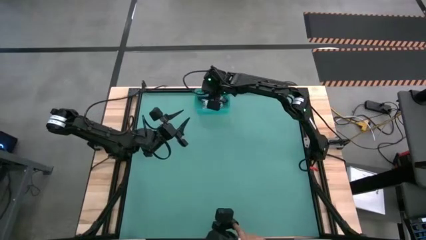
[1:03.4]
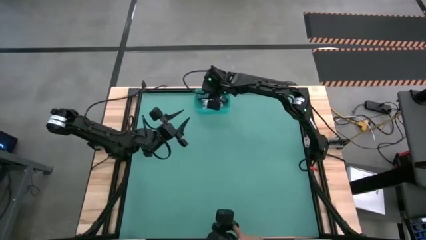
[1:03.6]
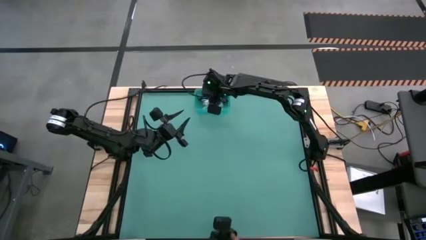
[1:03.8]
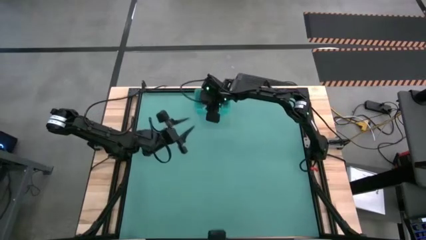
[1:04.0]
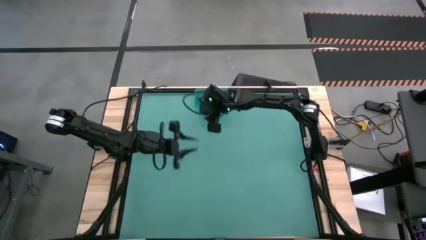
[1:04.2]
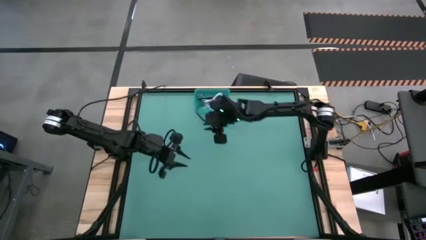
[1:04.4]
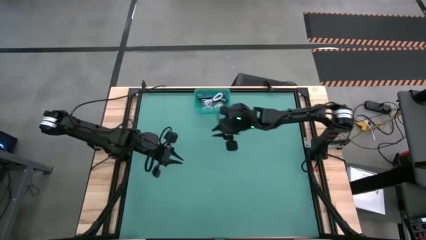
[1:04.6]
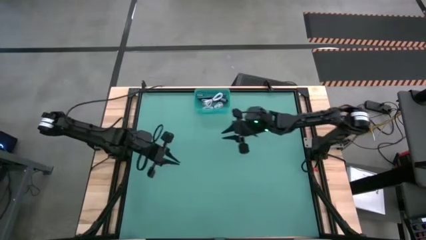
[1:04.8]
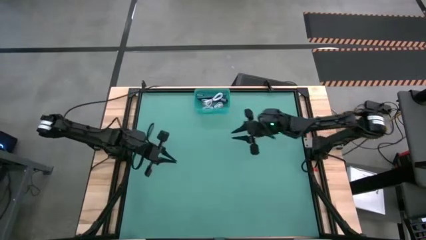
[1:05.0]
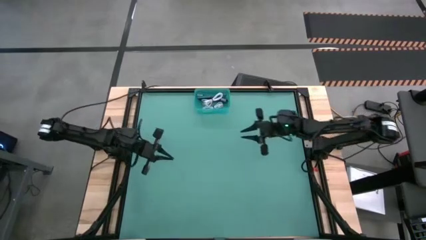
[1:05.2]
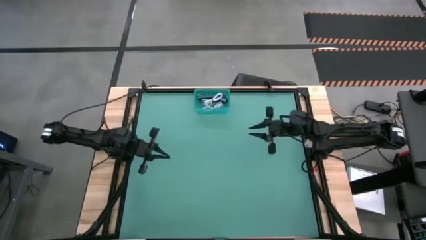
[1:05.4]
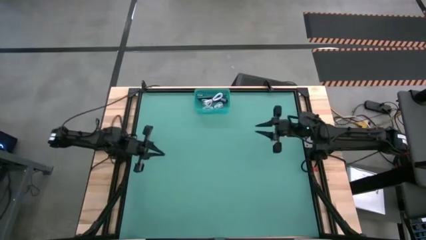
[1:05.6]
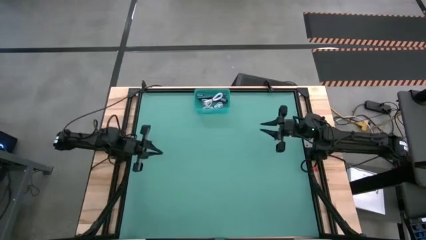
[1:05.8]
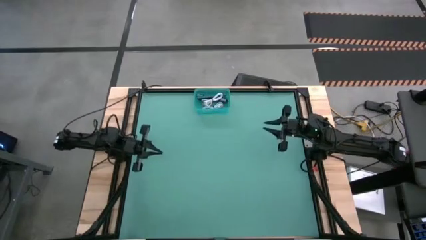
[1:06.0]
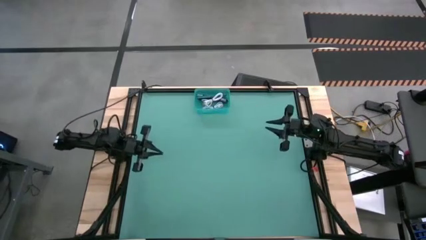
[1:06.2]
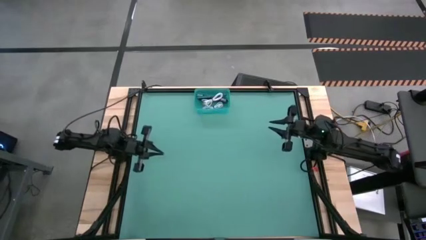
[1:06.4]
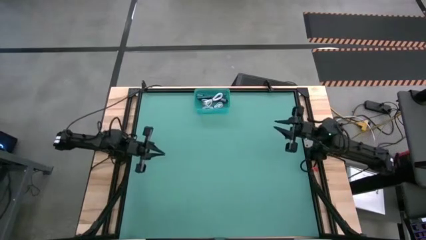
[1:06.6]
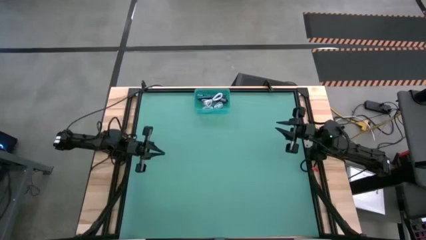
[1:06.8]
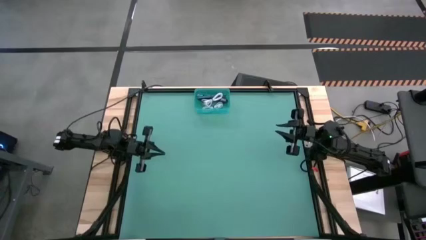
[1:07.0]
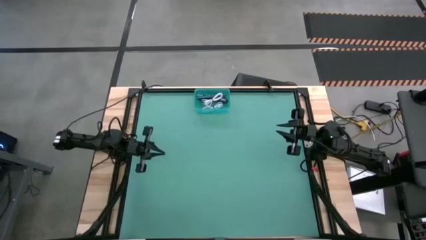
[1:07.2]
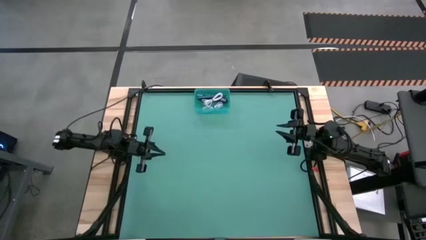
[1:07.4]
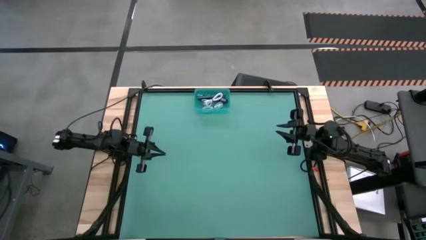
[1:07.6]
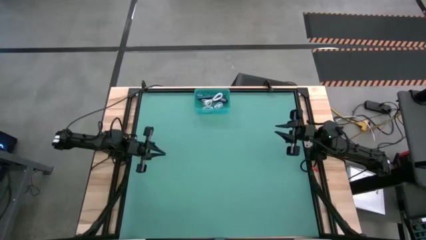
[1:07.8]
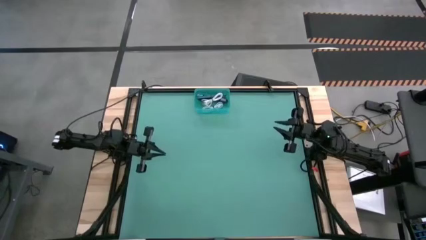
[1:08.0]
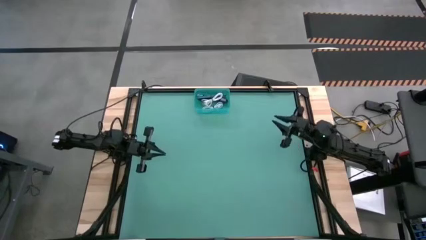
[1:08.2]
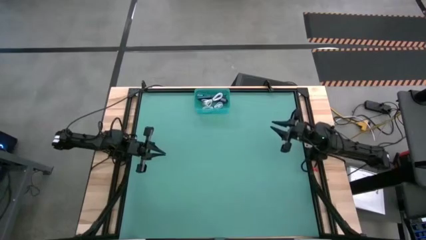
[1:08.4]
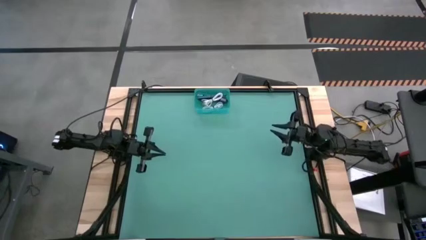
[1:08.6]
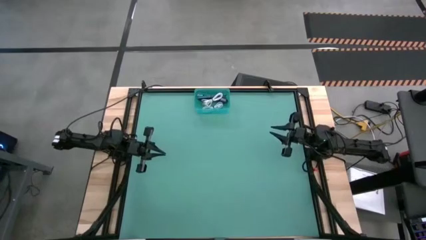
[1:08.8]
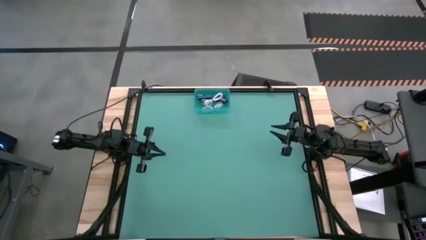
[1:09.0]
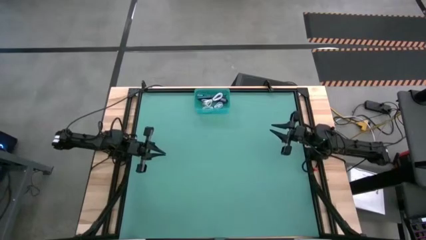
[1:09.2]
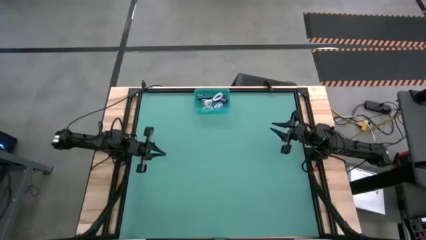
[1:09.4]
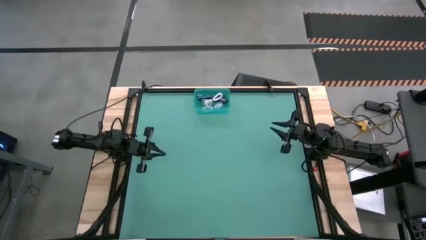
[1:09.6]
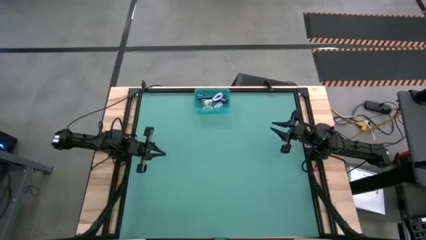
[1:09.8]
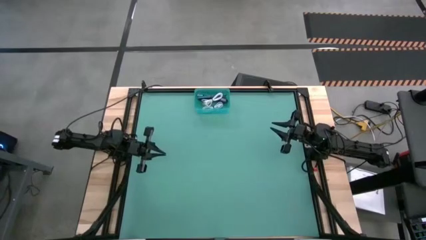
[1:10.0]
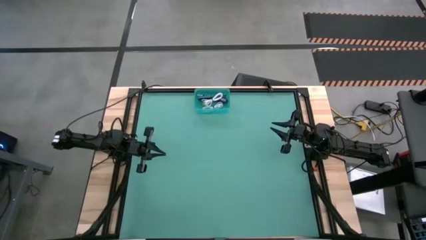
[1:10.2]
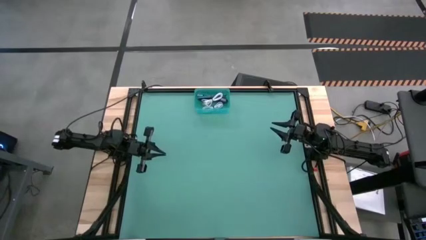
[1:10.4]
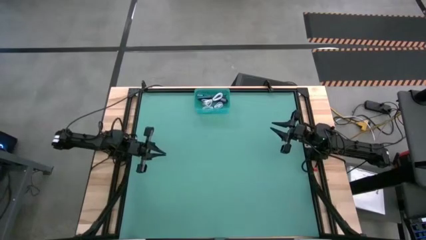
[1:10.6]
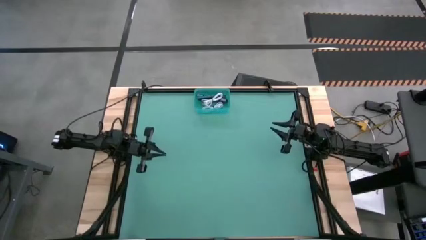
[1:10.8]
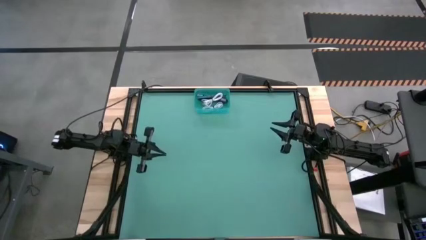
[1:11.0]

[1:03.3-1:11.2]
Task: Pick and place USB-C Cables
Return to Home Position
